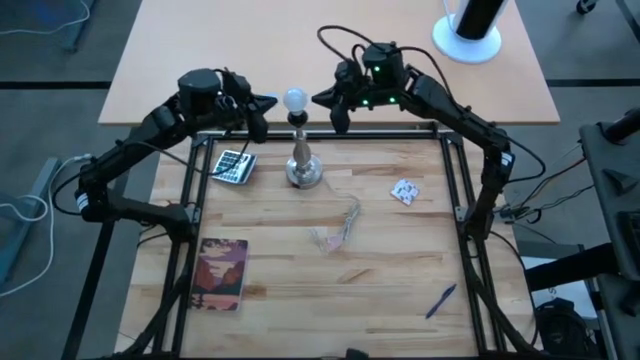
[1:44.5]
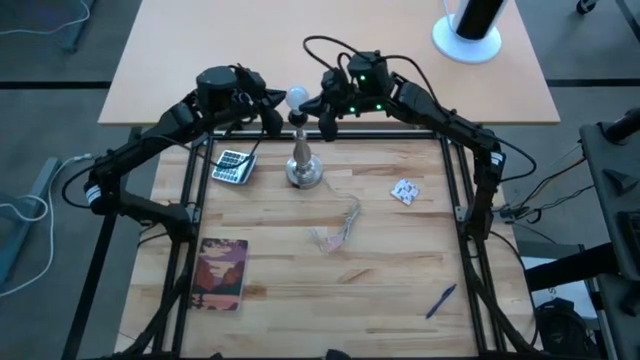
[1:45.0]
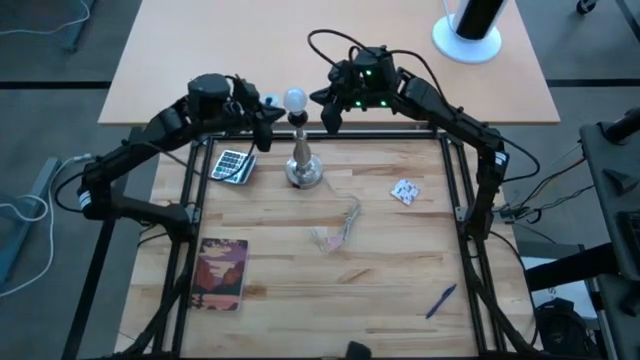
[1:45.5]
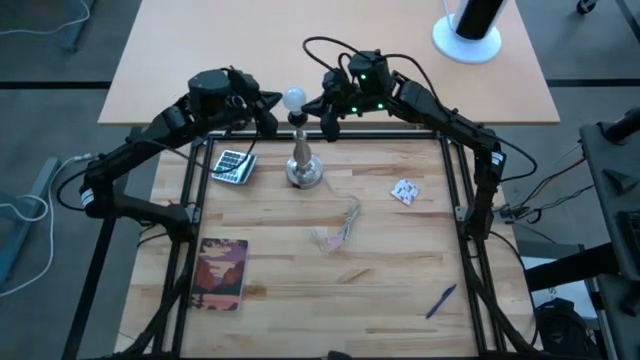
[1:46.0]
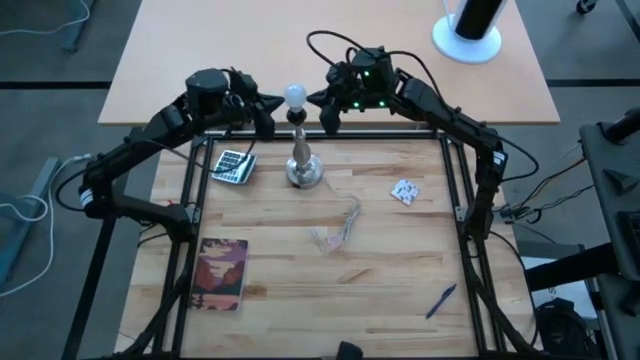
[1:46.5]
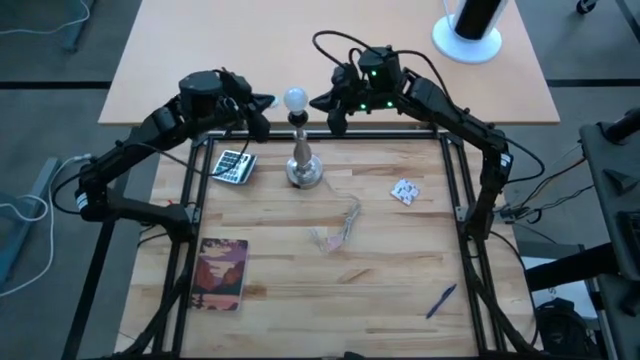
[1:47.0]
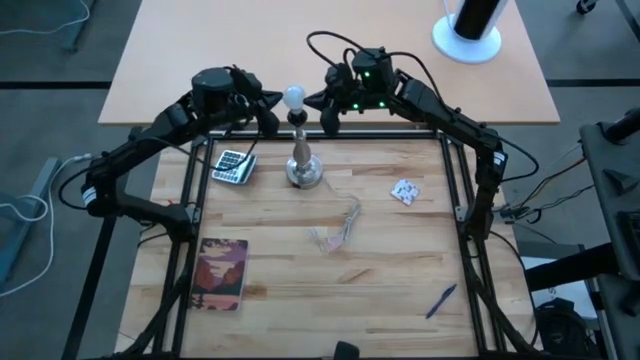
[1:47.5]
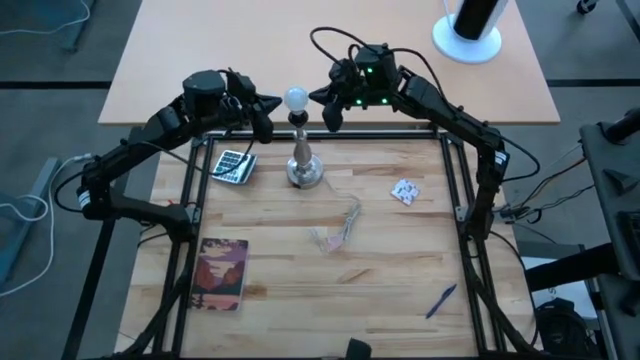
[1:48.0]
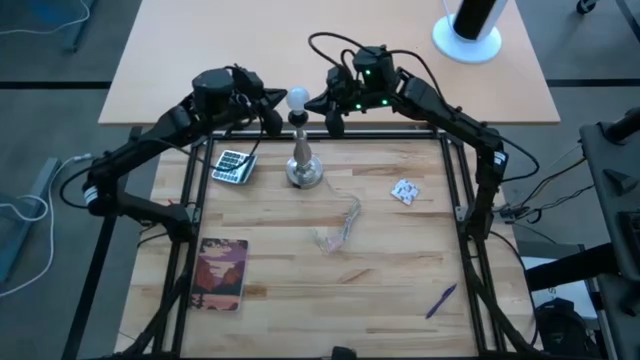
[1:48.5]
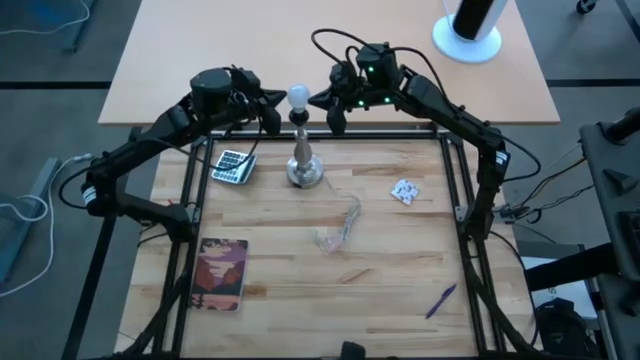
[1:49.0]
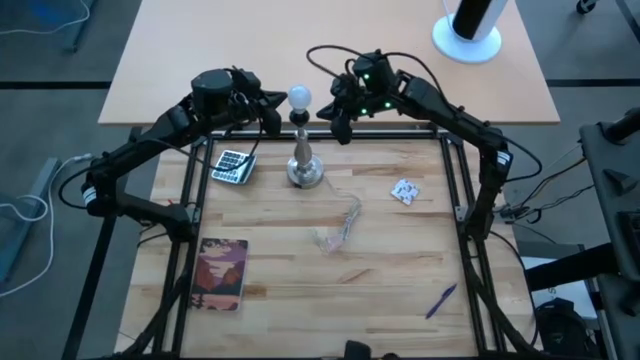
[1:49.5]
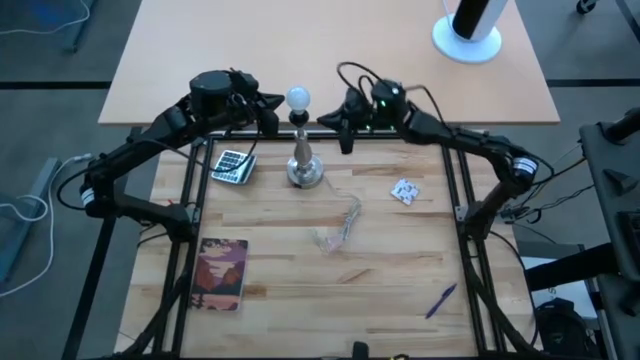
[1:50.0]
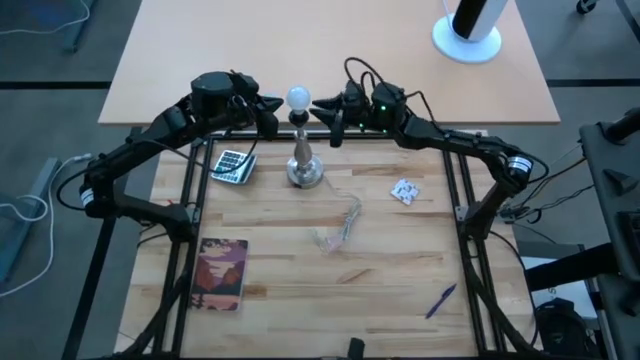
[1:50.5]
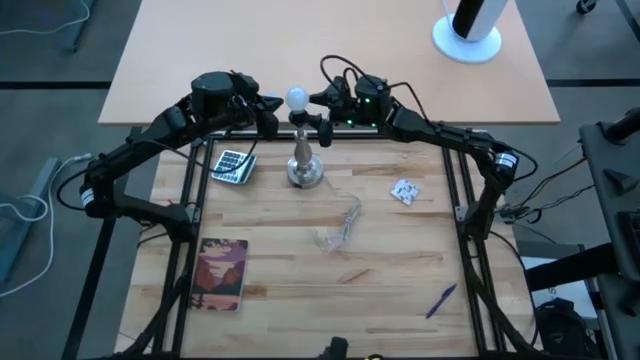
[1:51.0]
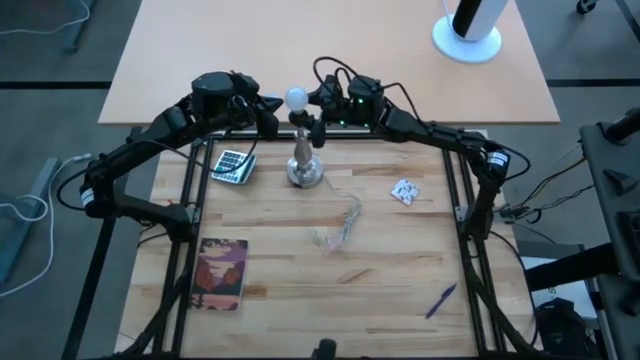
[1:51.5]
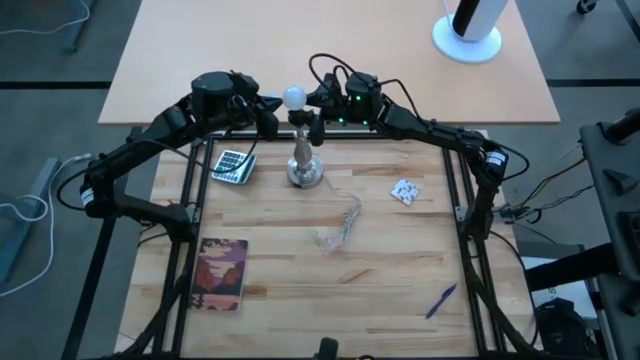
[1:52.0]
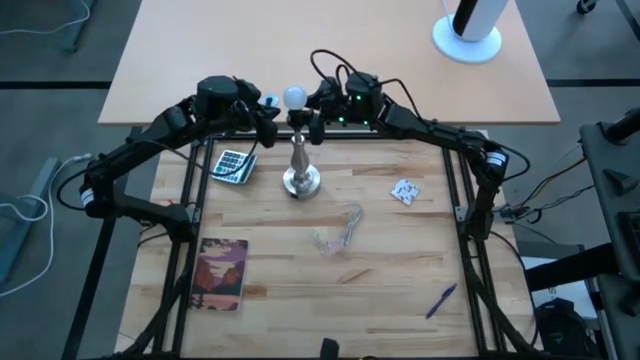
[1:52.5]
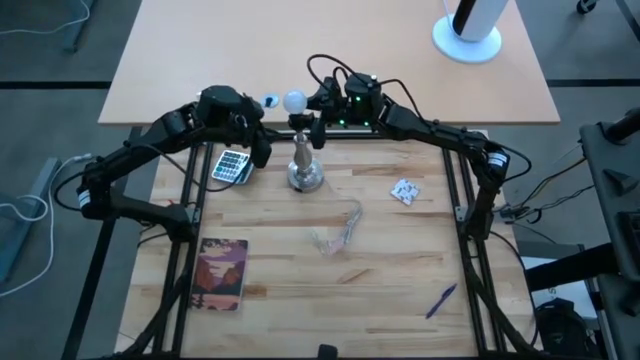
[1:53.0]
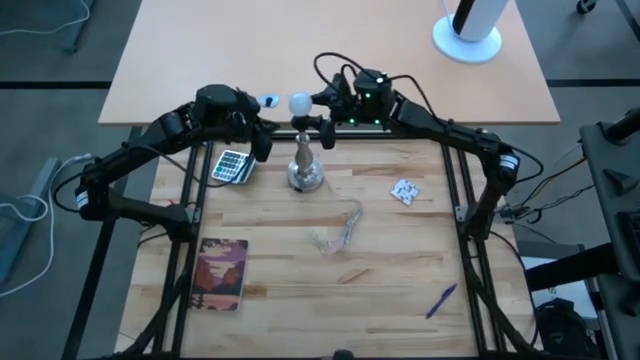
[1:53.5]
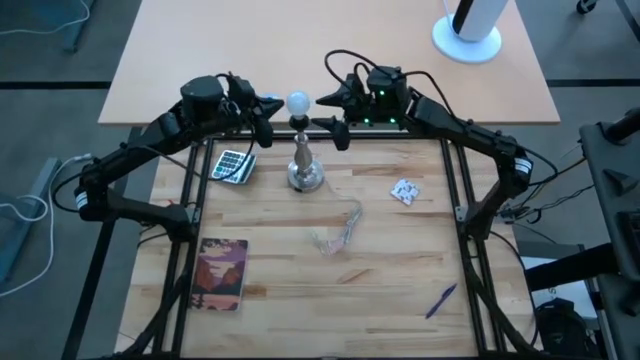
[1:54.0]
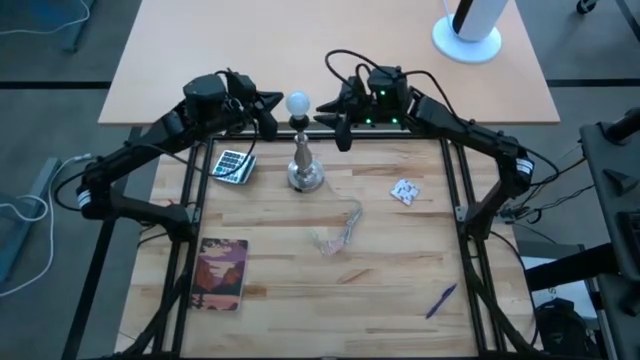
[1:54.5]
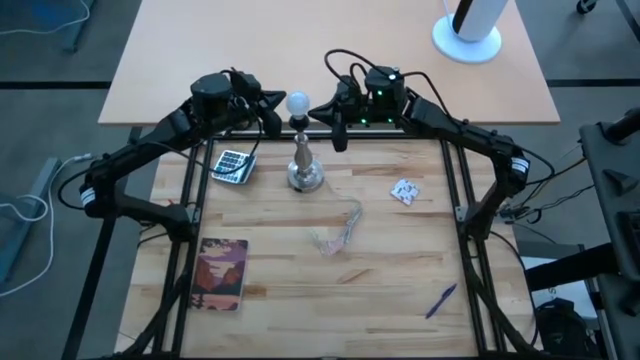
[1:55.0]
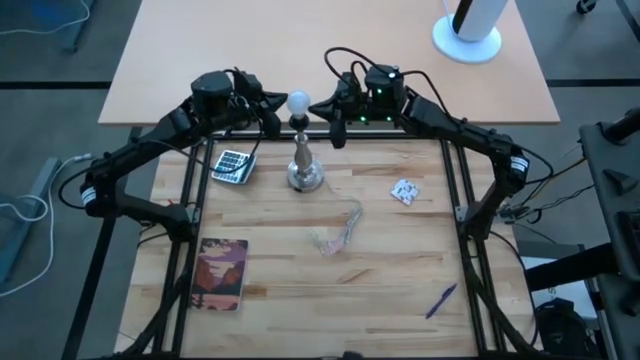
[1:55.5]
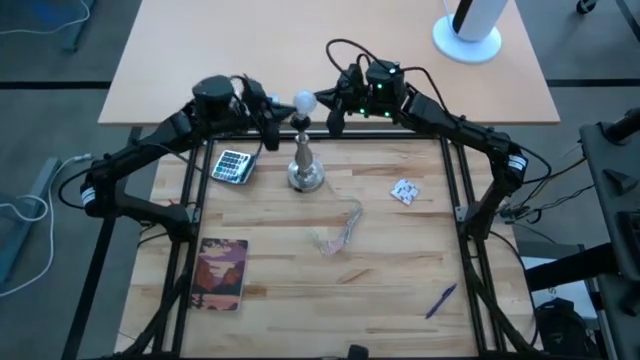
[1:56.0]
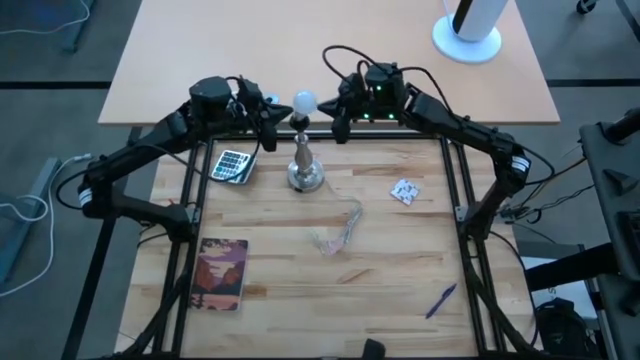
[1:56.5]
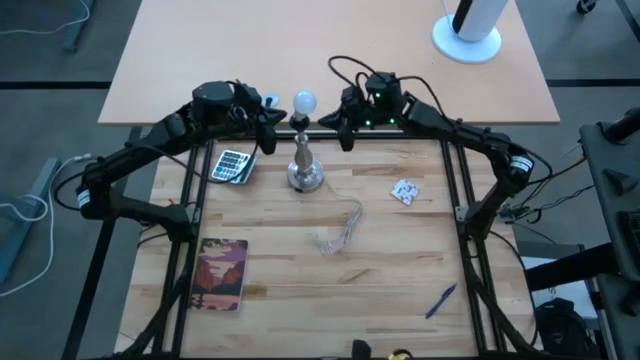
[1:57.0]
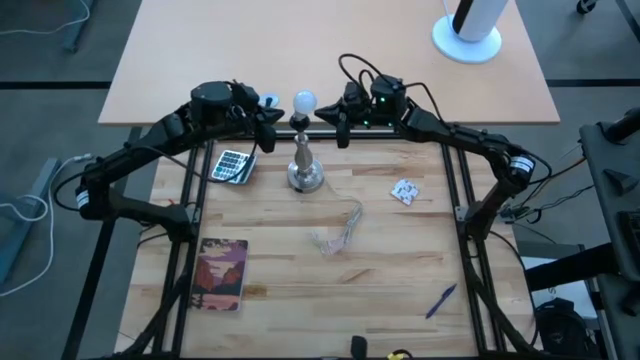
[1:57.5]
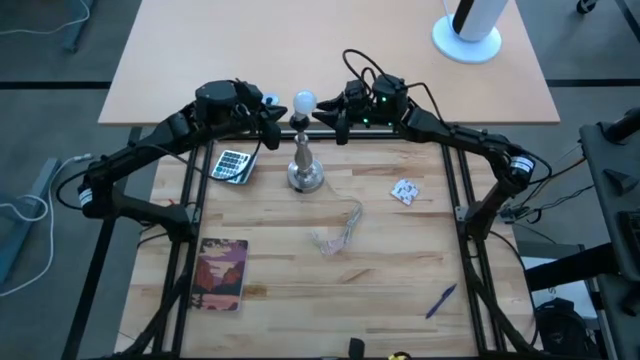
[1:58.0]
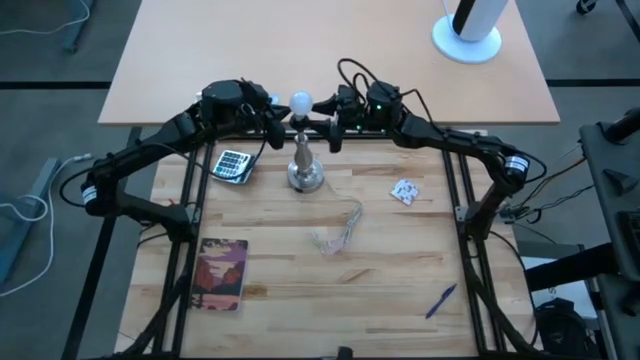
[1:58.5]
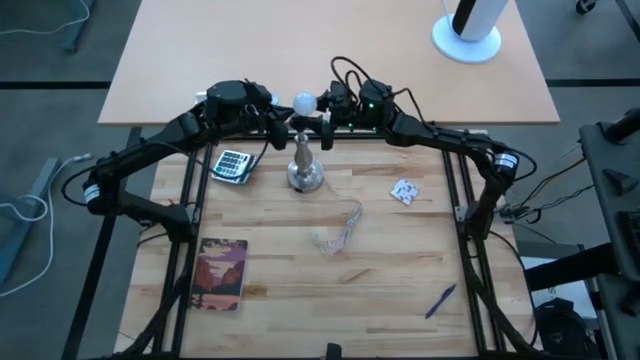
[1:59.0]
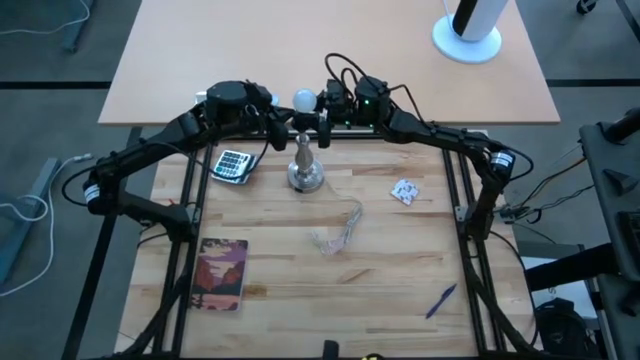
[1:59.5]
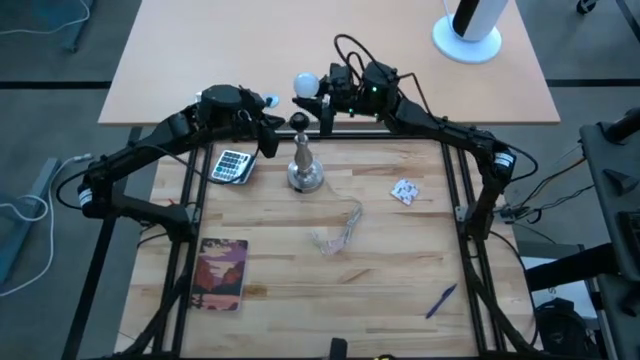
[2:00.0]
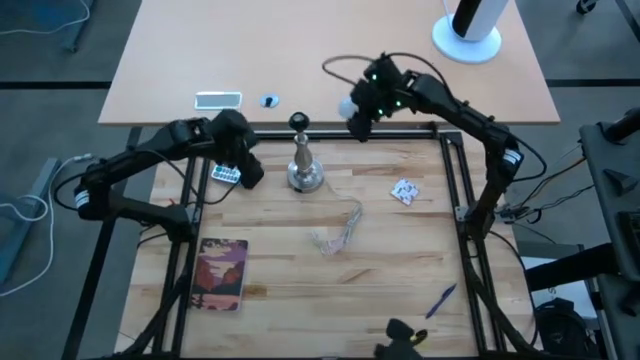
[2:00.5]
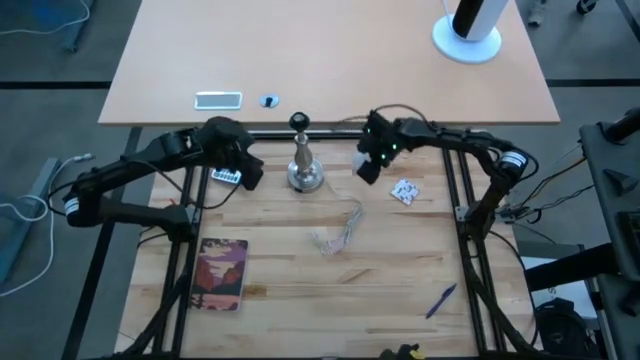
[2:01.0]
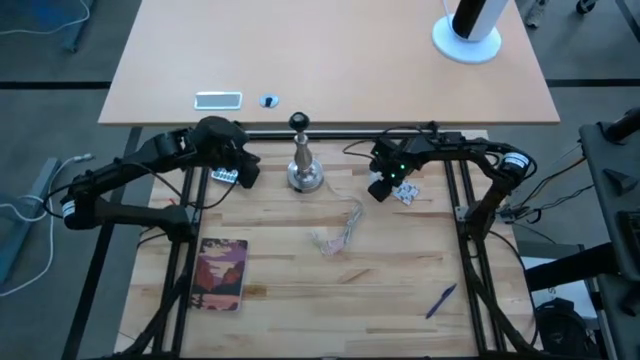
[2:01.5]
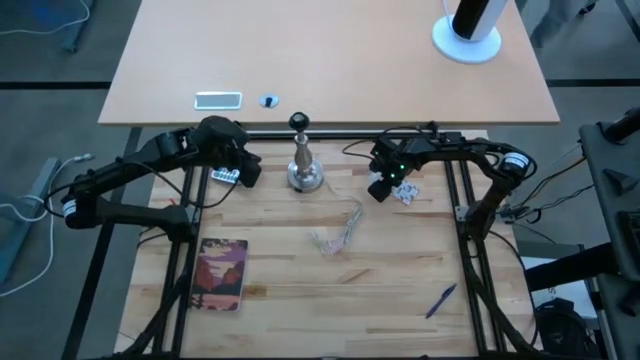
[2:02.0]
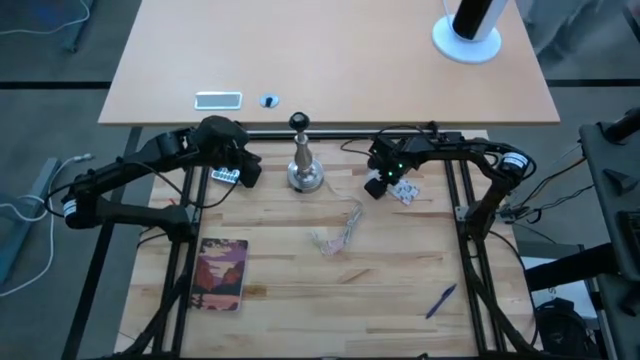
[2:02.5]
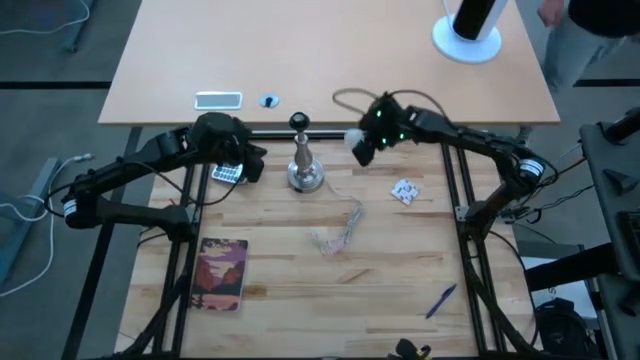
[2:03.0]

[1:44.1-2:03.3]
Task: Screw lightbulb
Remove the lightbulb from the lamp
